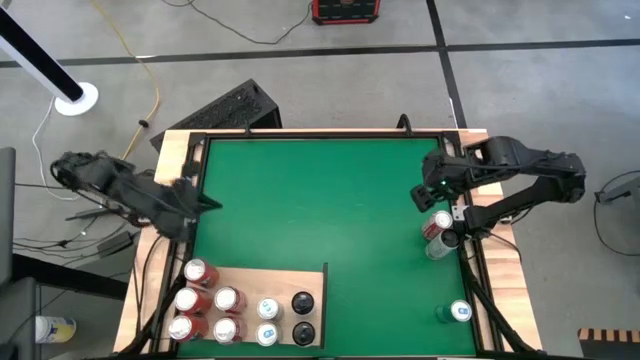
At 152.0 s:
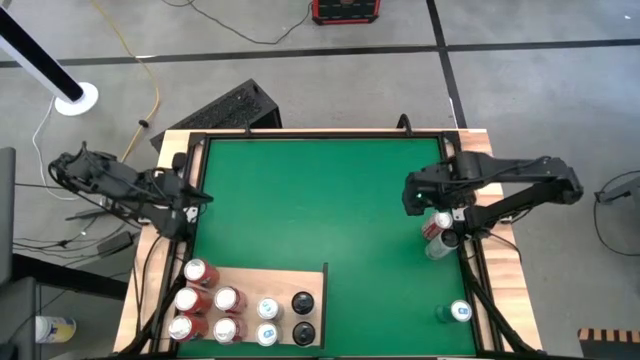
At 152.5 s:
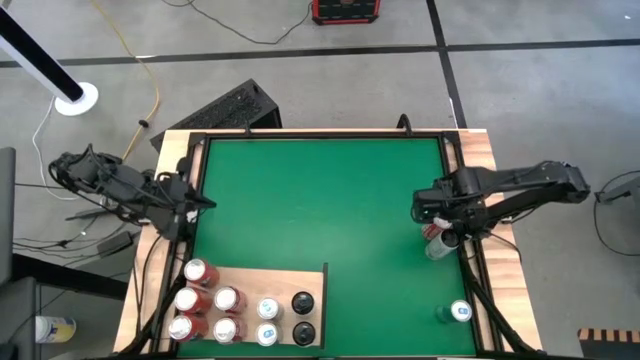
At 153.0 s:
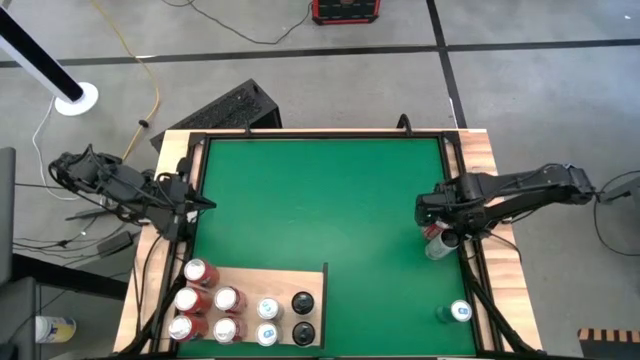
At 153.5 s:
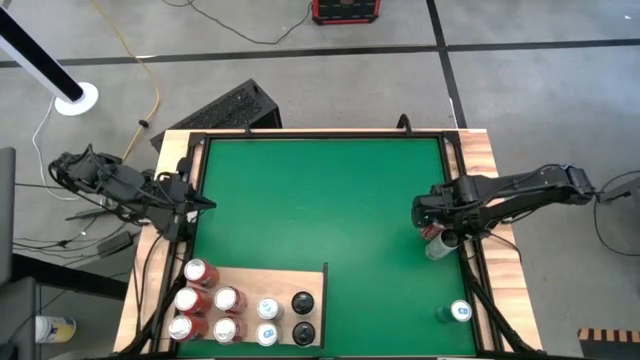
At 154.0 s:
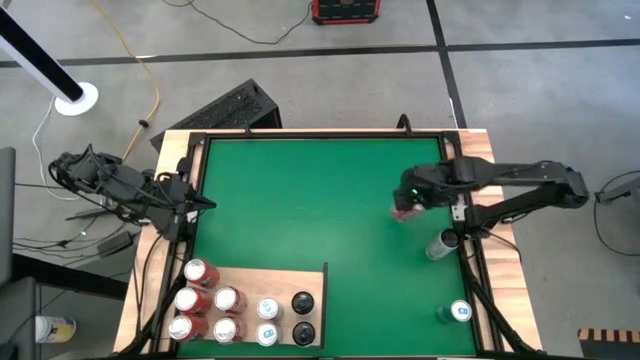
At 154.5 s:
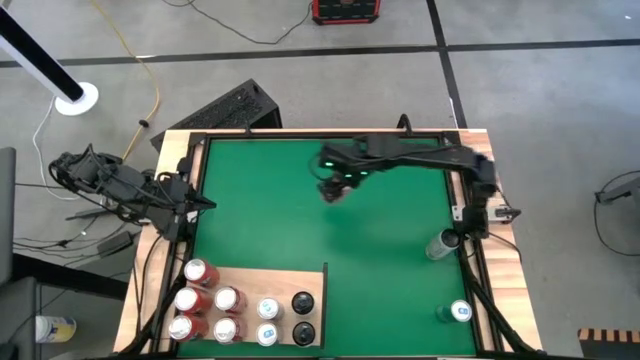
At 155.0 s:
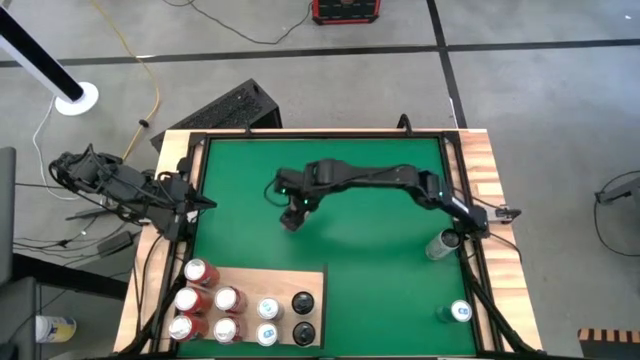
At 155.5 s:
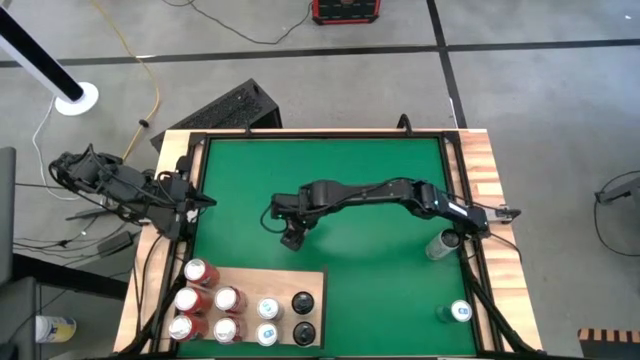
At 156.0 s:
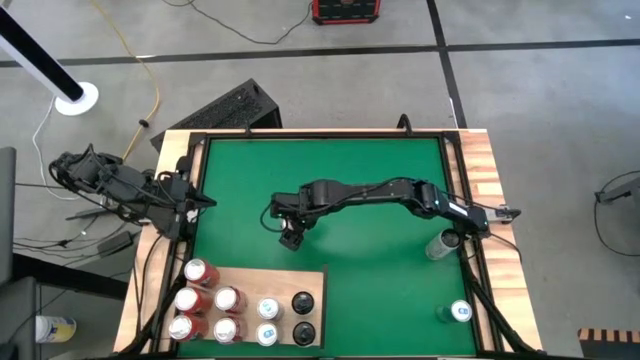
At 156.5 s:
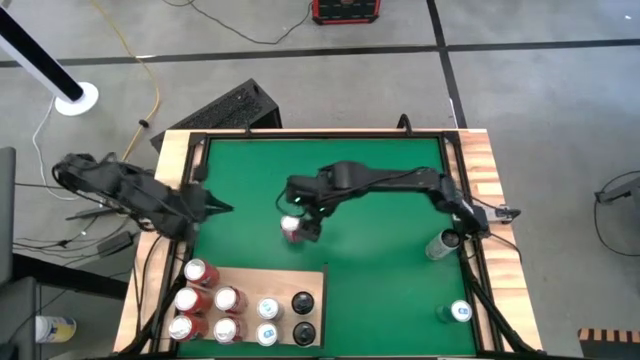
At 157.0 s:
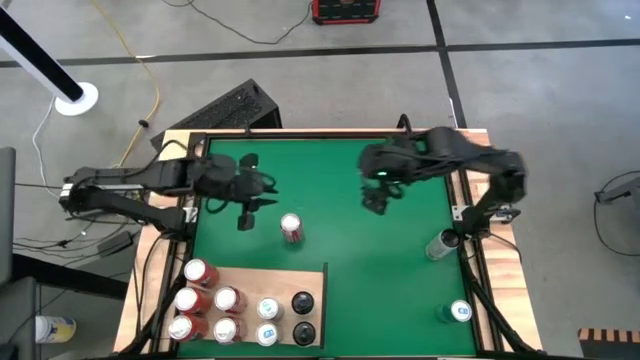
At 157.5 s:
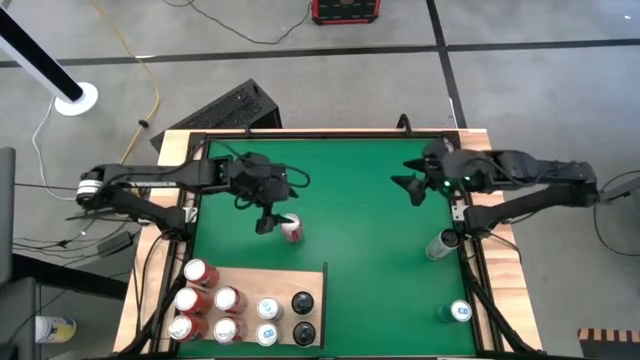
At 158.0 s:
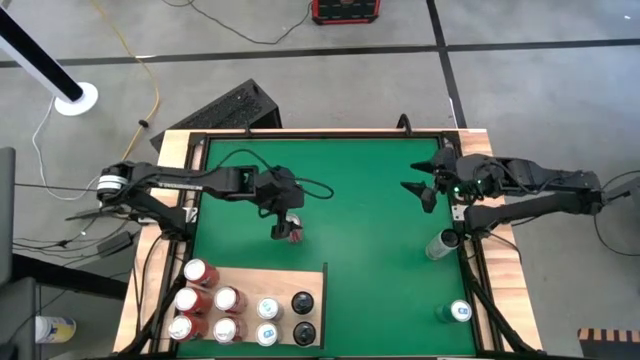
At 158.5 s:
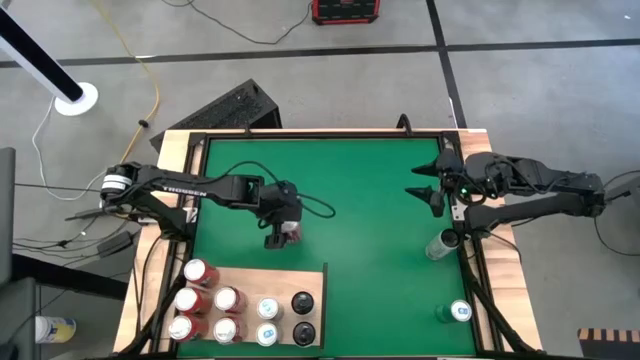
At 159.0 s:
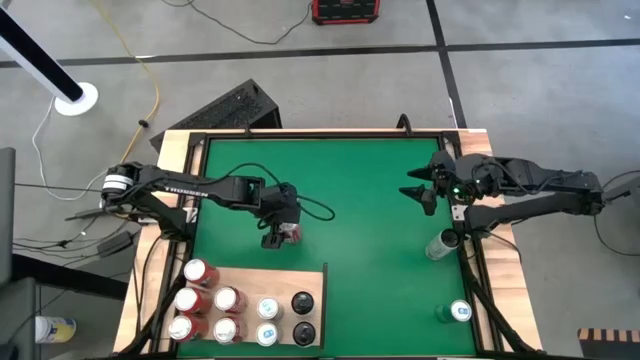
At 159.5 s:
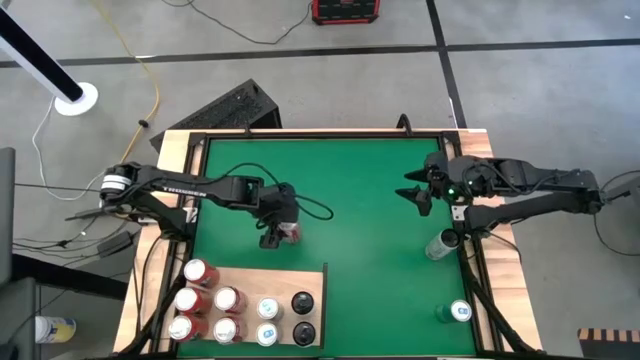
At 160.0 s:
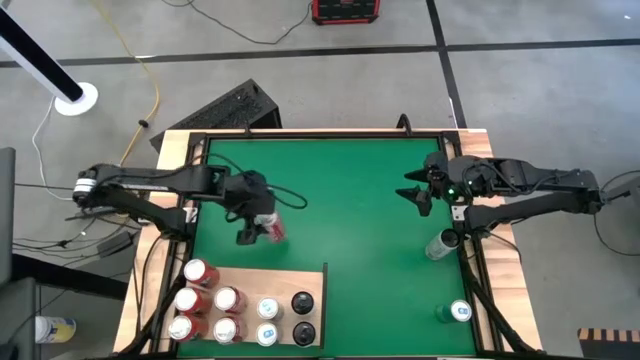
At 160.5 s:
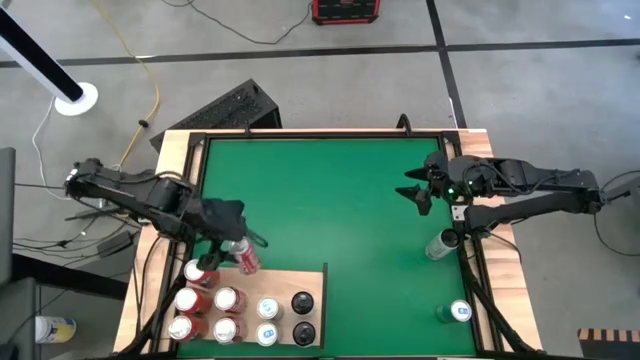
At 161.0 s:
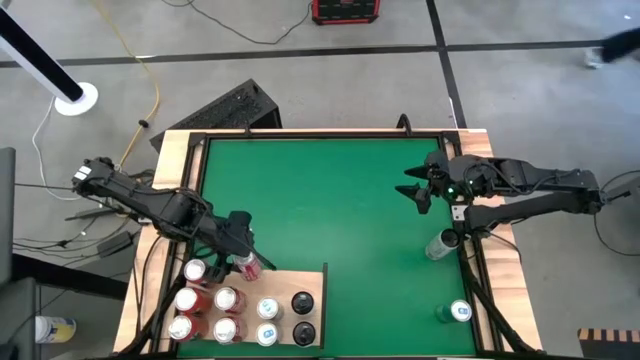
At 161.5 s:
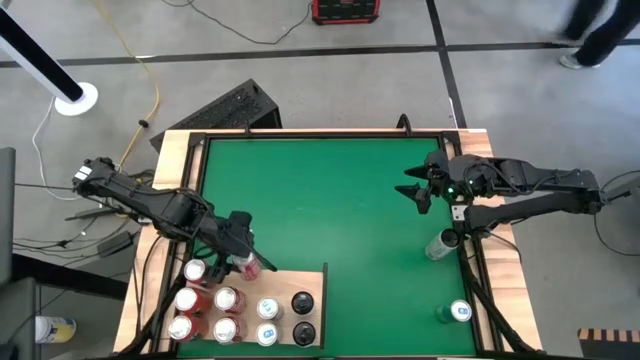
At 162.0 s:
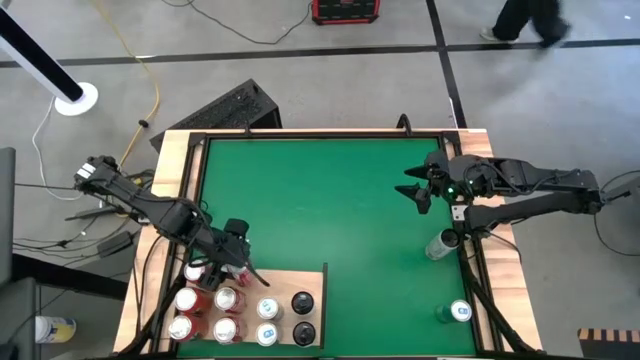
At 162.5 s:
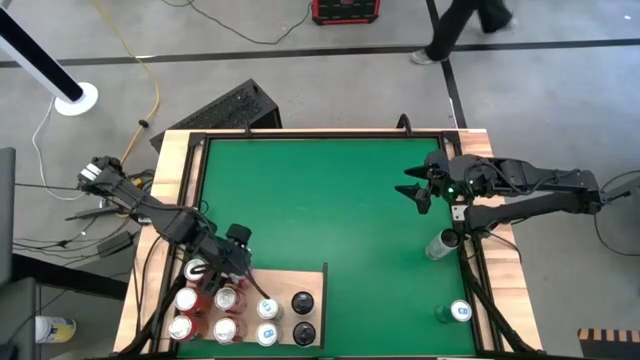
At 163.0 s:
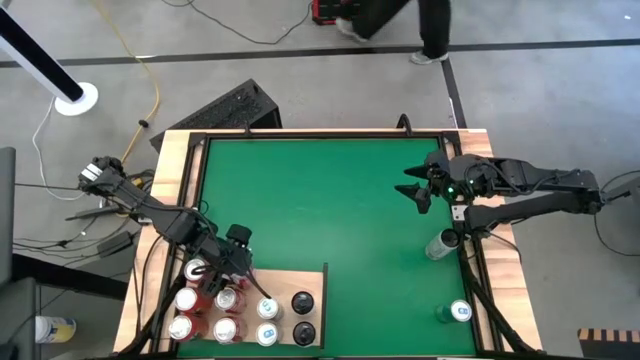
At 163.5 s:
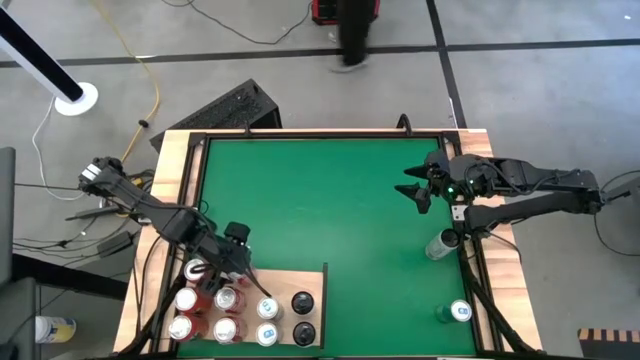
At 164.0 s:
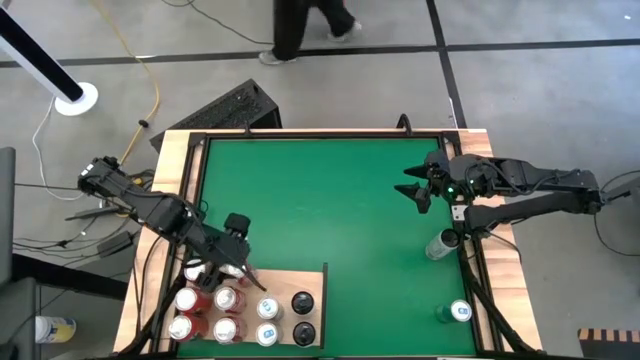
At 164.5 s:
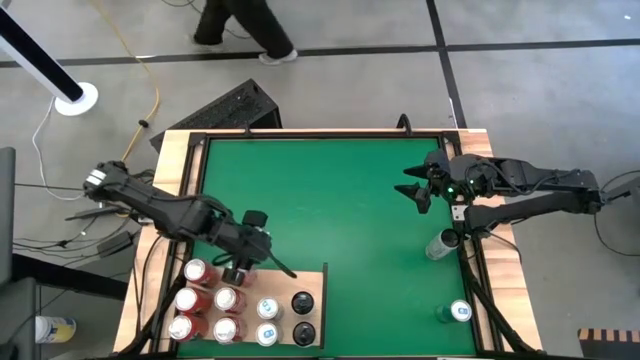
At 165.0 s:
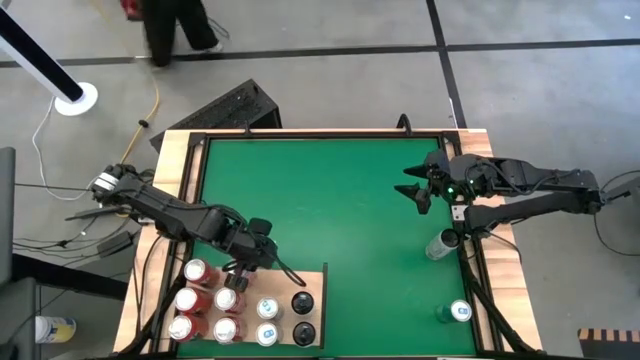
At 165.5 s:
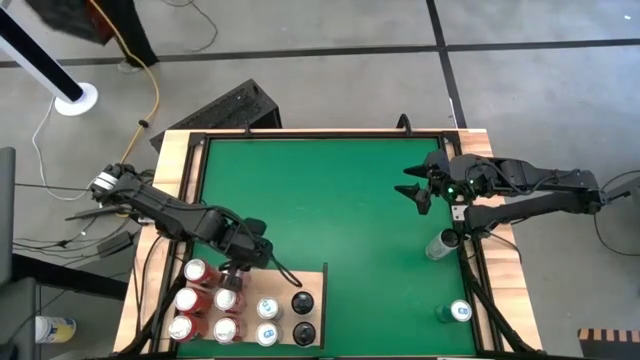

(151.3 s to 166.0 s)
Task: Place canned beverage on shelf
Put the red soda can on the shelf aligned with the other red soda can

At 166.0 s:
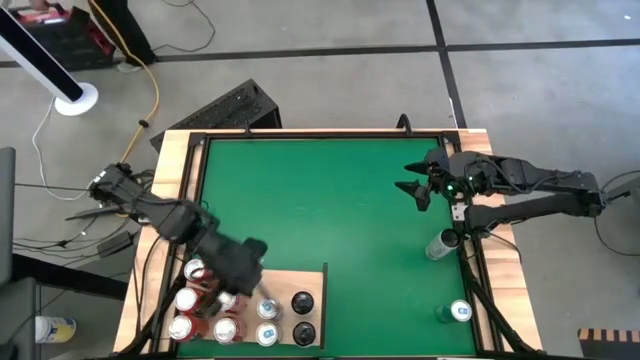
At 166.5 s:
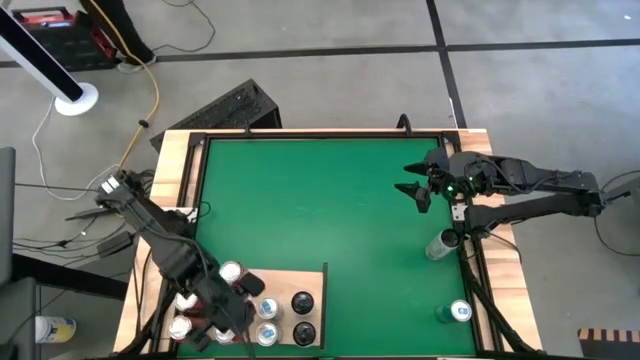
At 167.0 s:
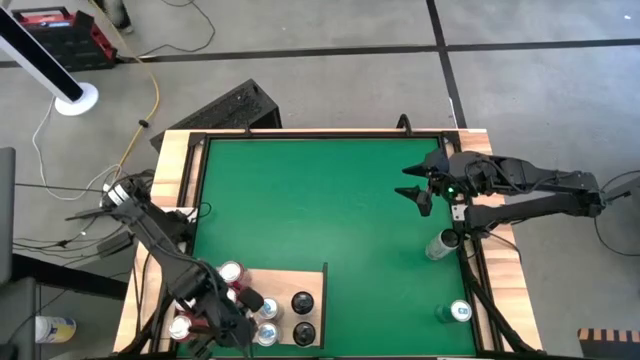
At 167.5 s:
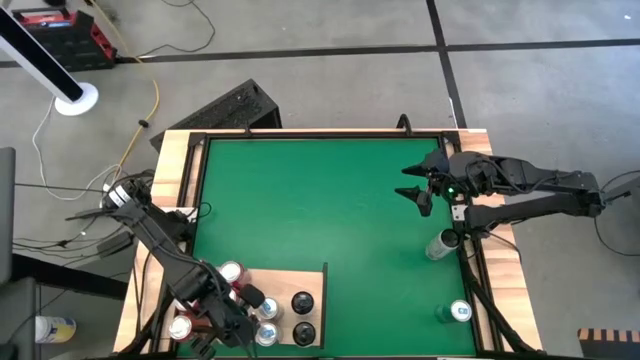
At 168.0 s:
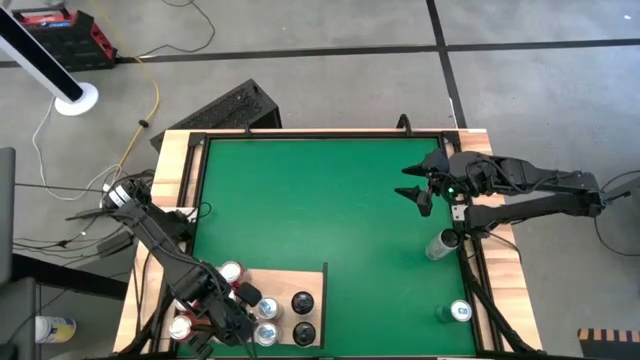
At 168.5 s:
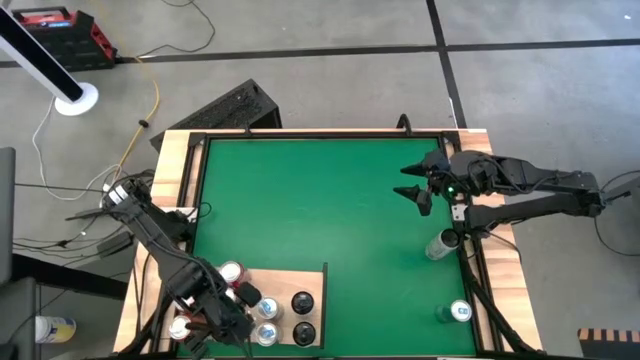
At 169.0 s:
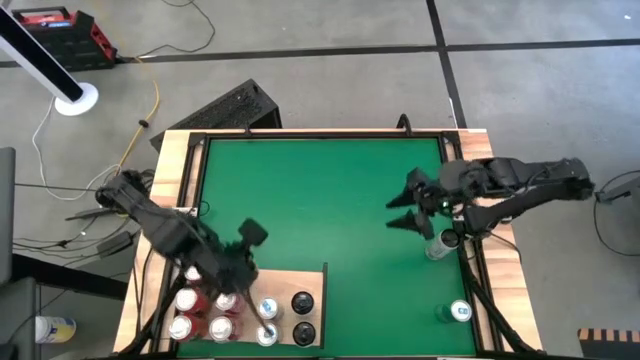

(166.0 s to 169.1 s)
Adjust the red soda can
